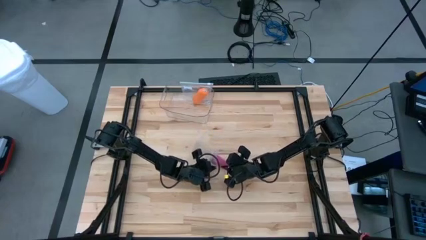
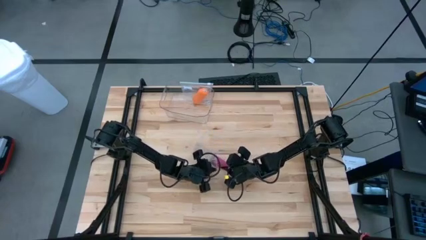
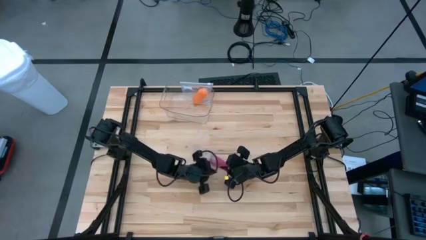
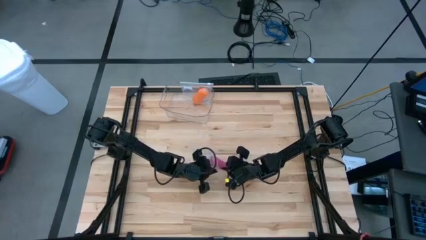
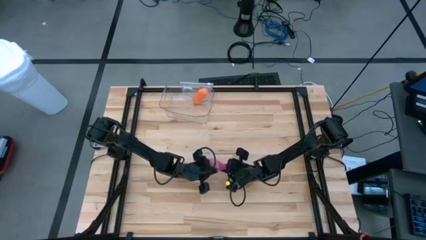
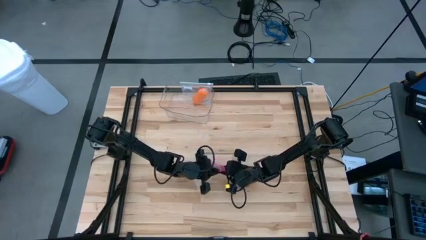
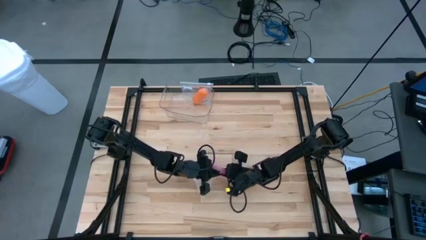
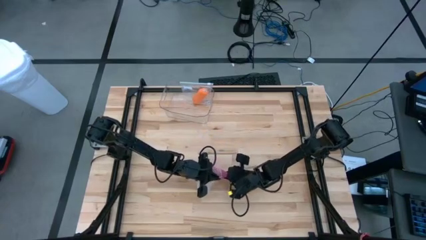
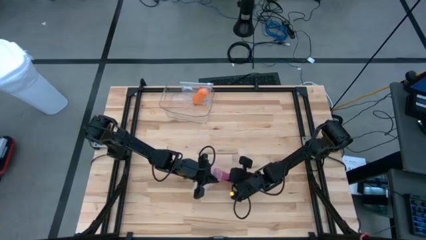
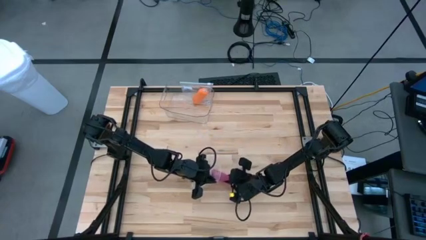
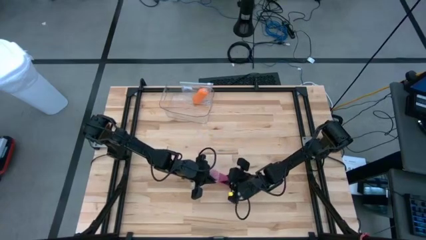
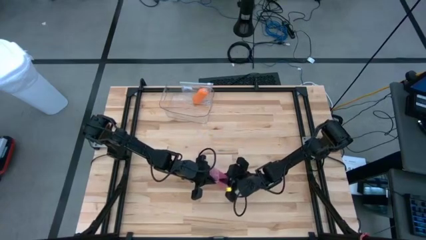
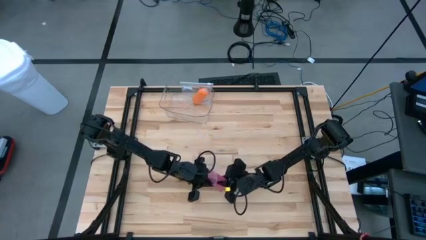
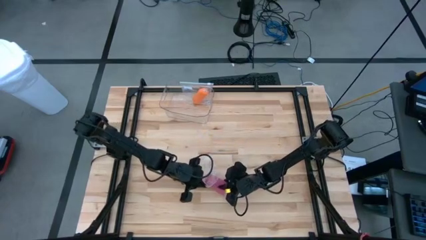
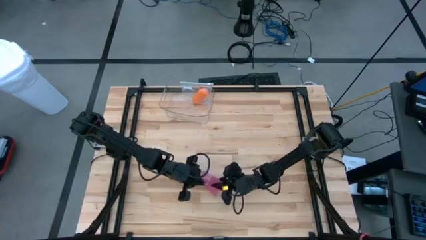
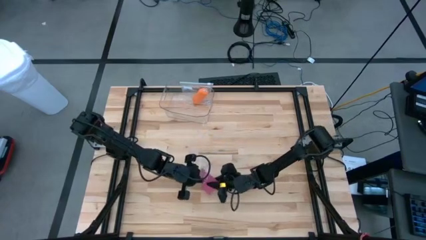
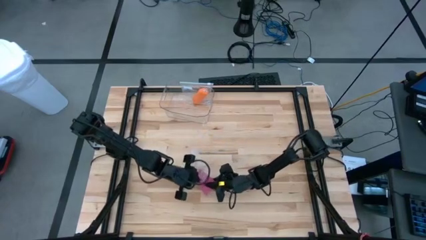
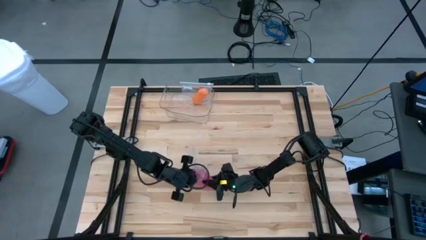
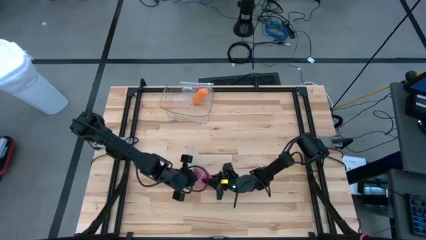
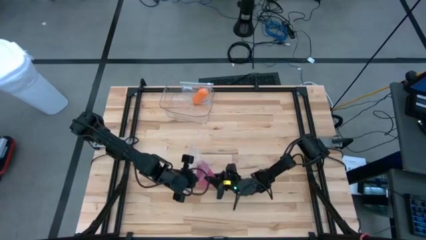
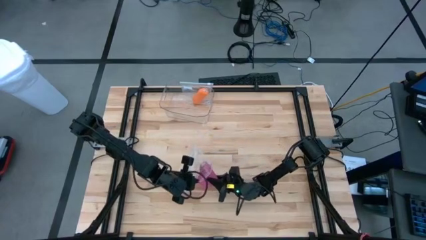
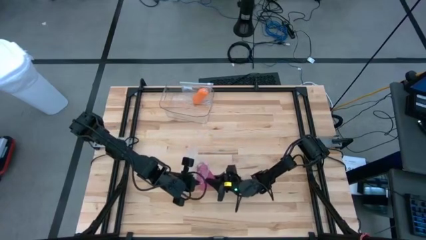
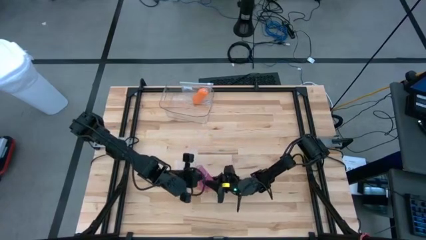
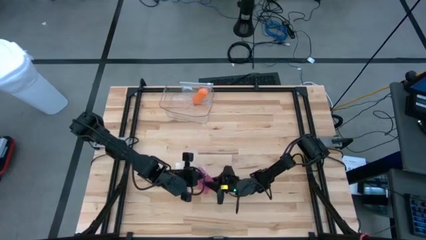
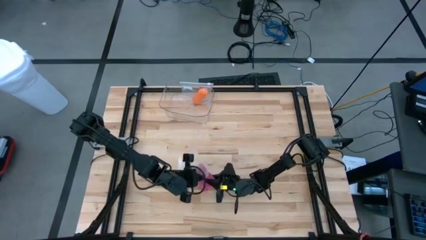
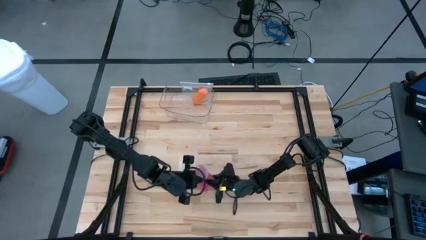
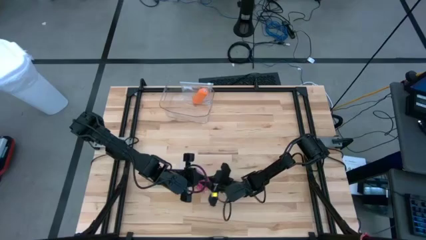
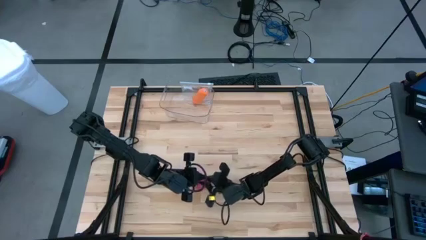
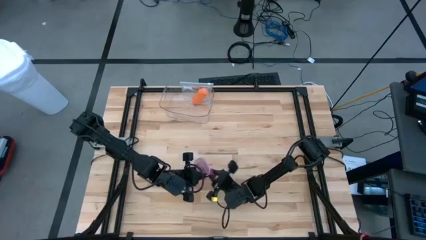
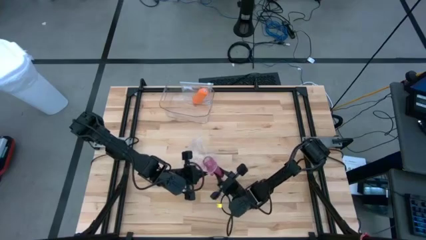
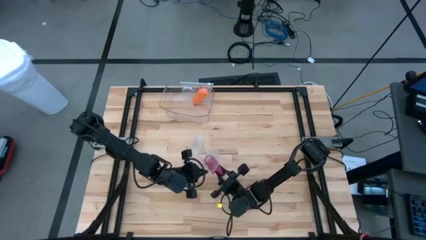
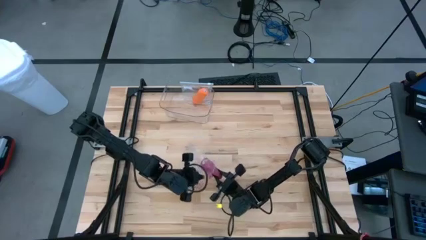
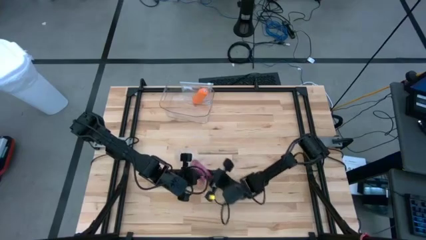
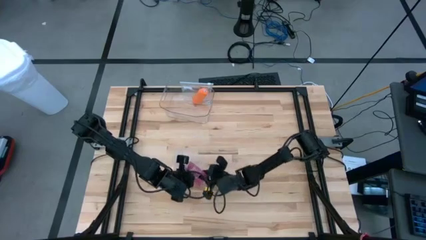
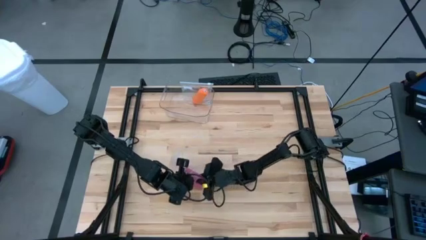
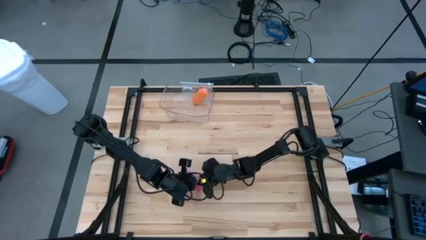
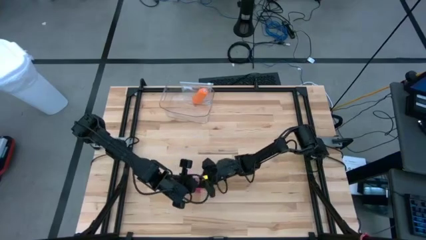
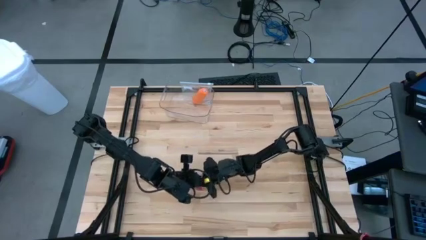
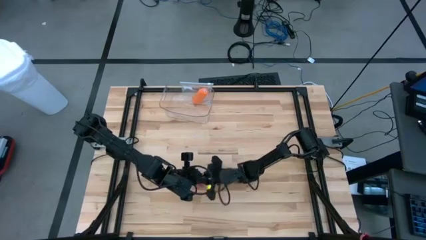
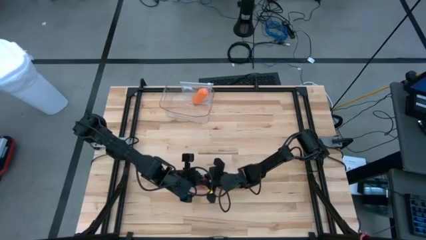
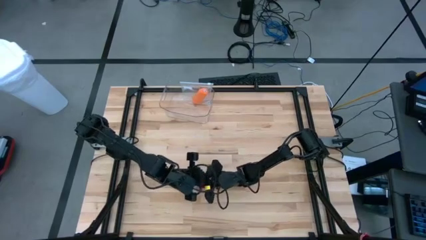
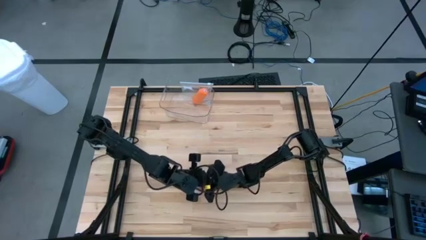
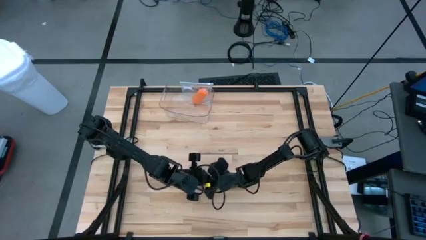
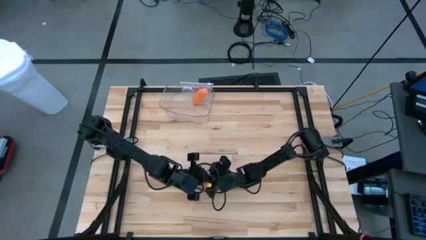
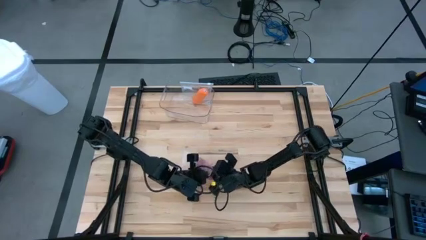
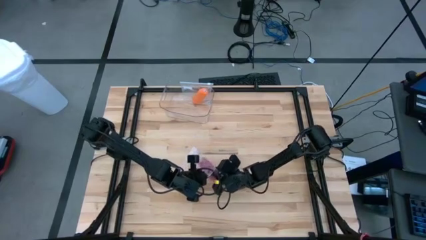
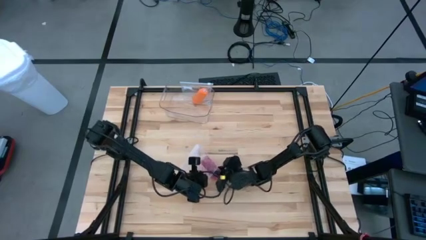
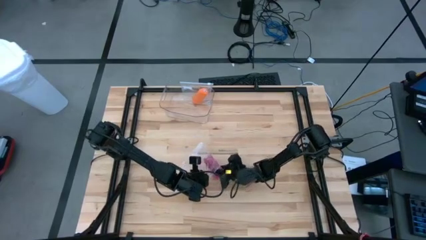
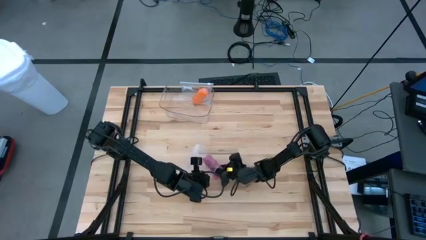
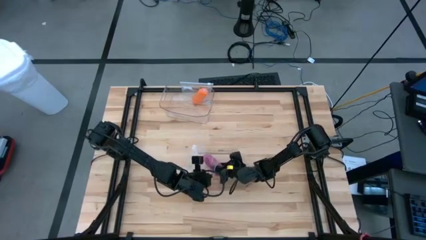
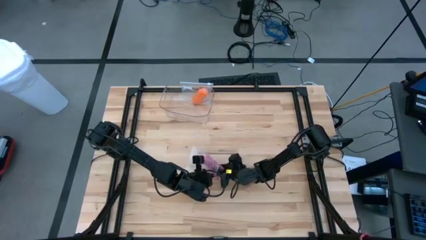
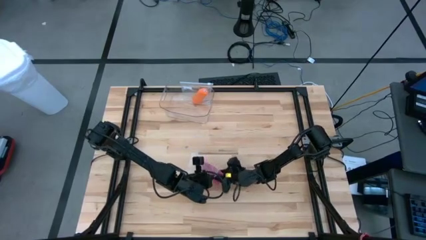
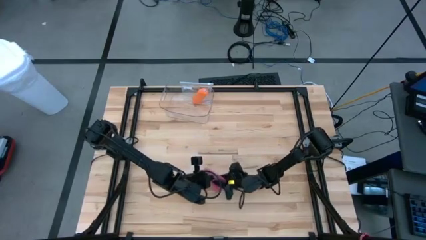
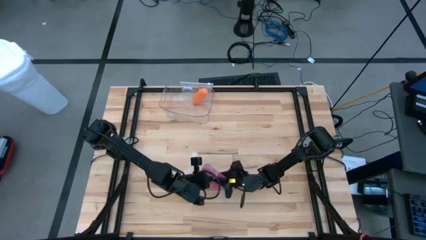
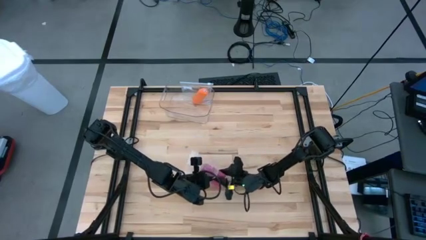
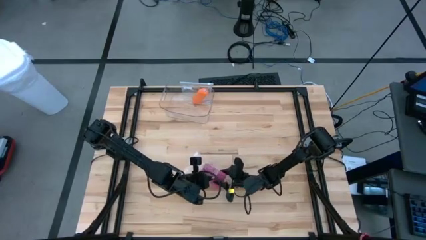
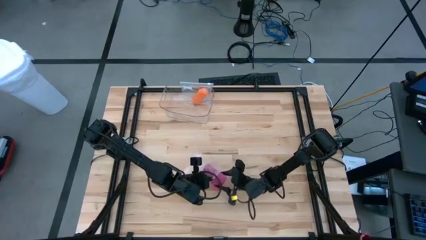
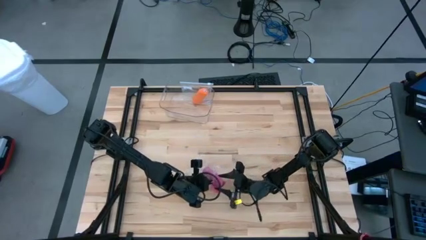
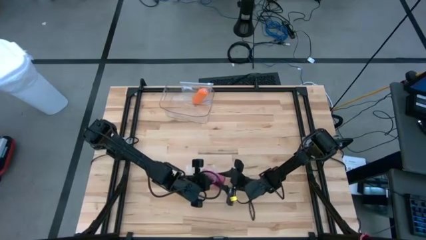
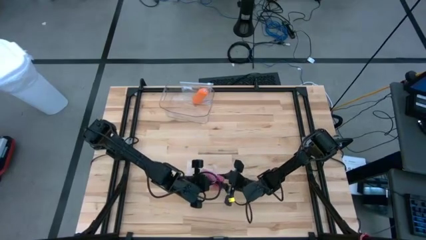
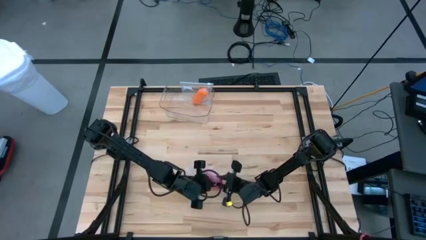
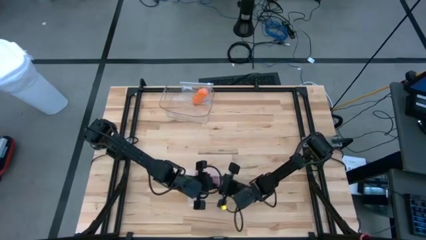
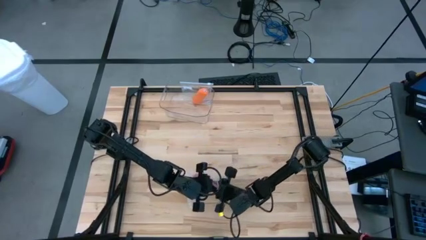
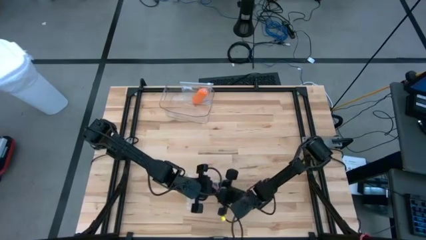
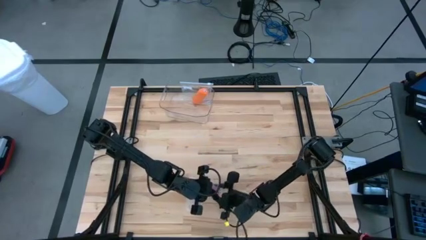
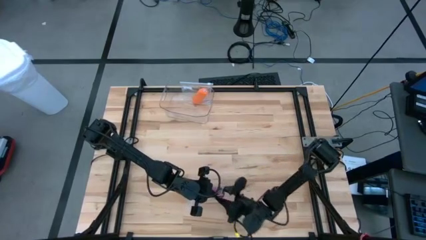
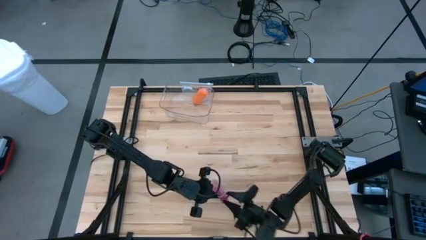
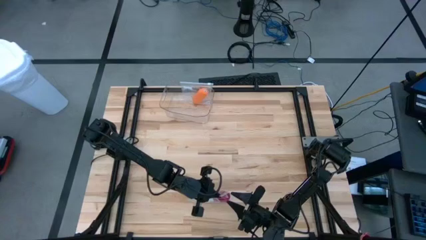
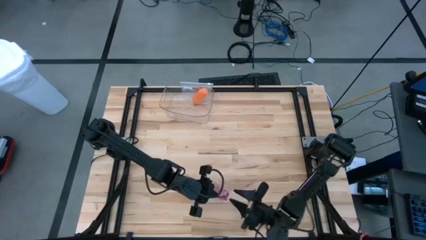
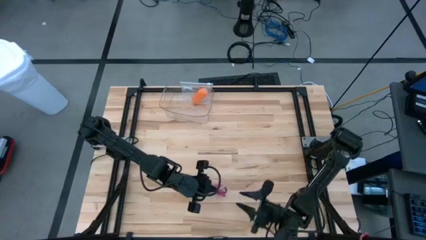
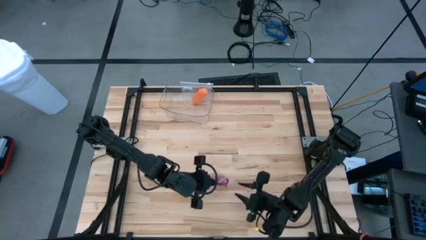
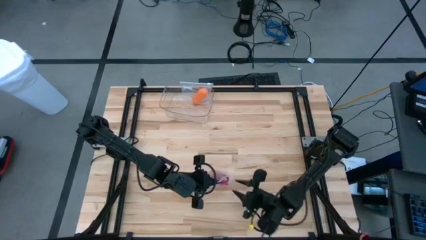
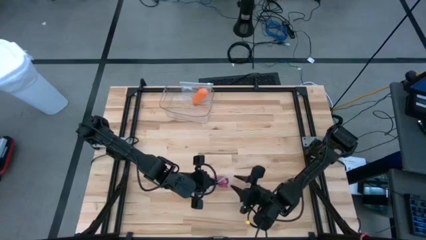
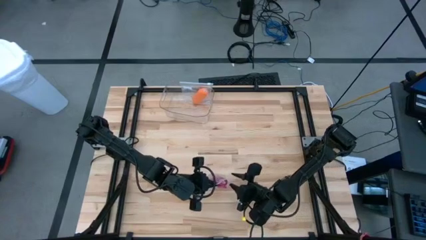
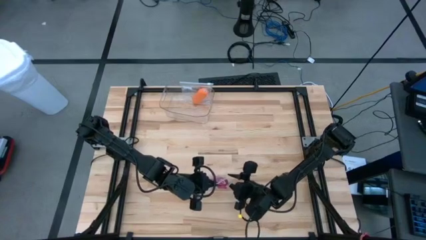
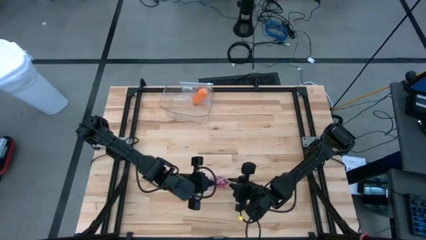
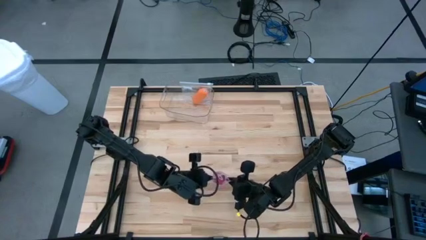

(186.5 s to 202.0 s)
Task: Roll bandage
Put the rolled pink bandage into the transparent zip bag
